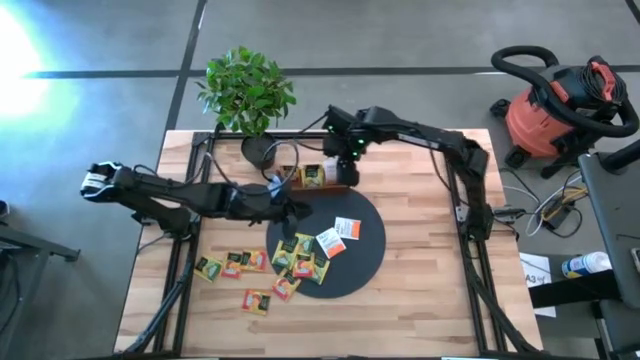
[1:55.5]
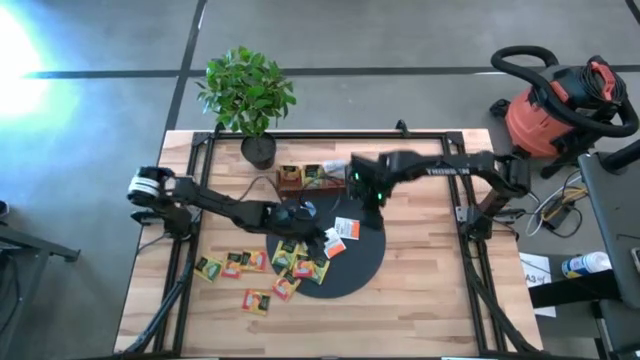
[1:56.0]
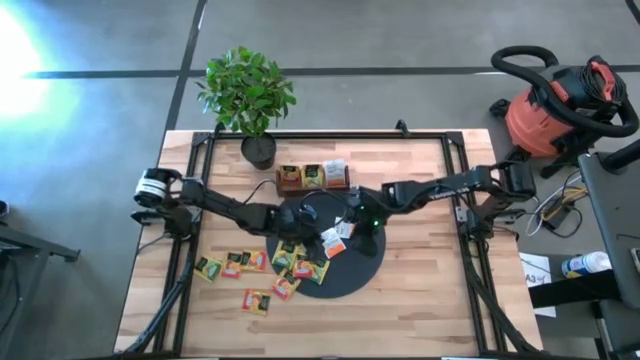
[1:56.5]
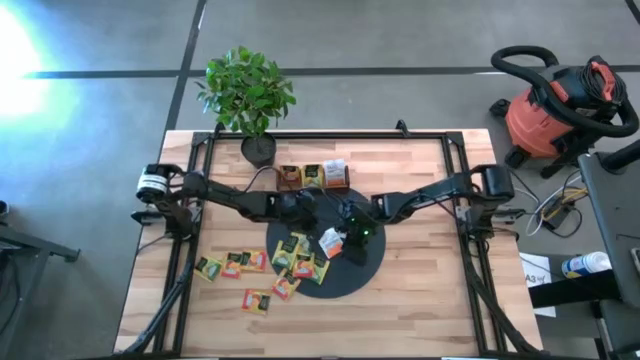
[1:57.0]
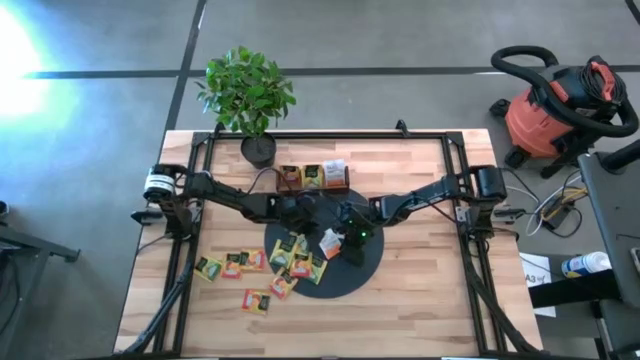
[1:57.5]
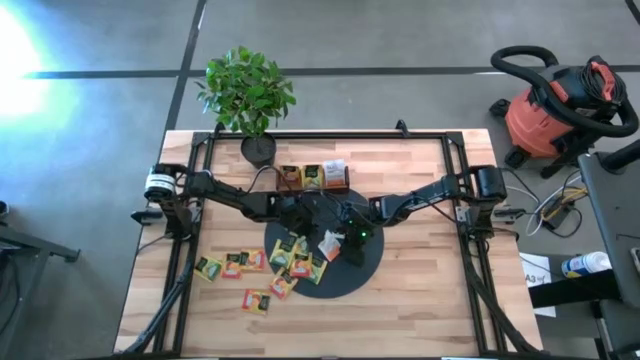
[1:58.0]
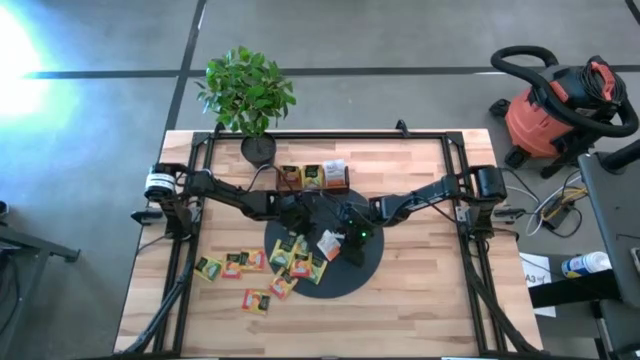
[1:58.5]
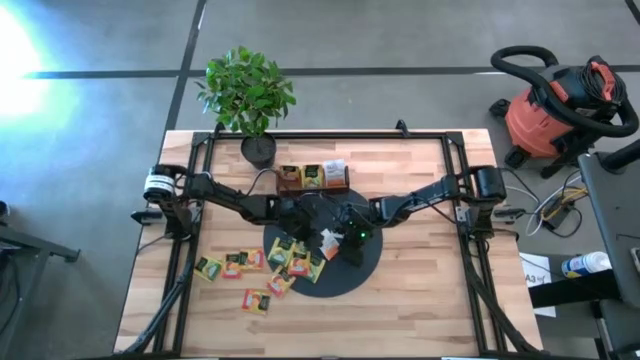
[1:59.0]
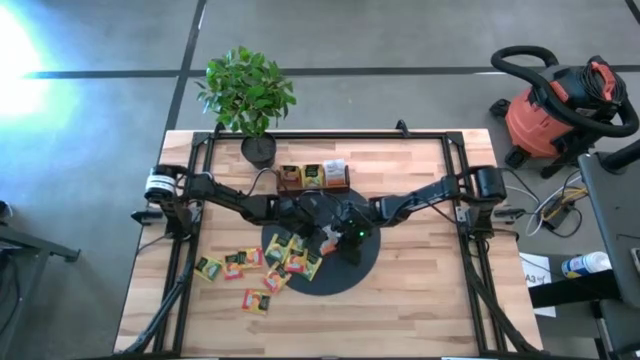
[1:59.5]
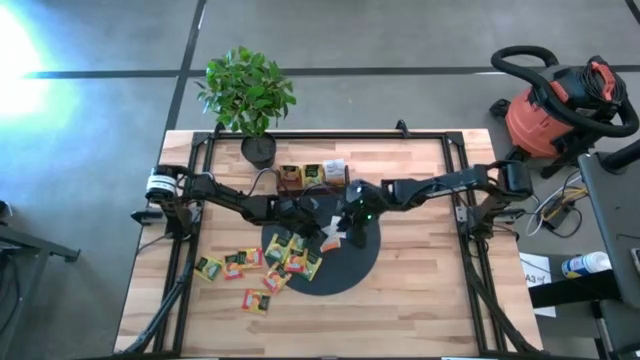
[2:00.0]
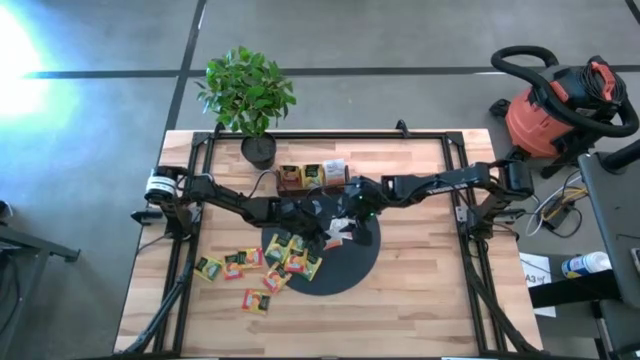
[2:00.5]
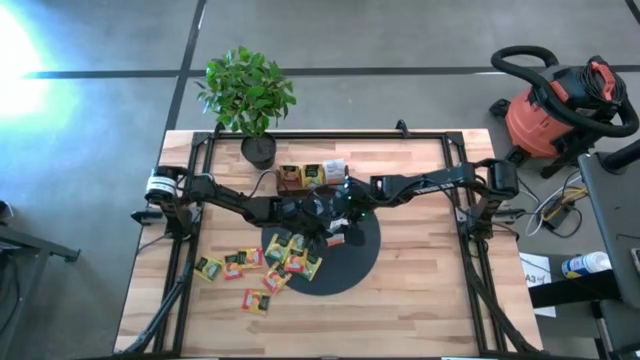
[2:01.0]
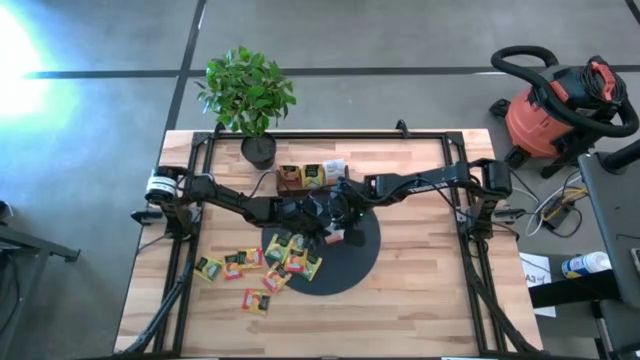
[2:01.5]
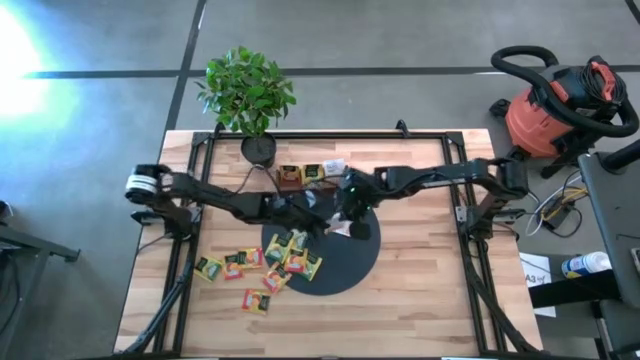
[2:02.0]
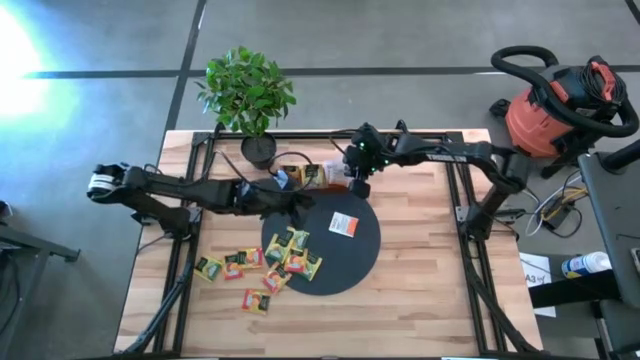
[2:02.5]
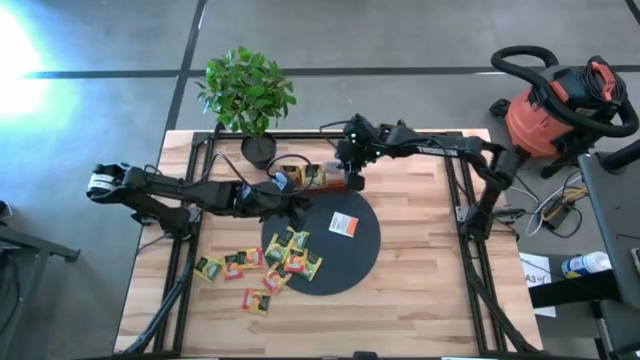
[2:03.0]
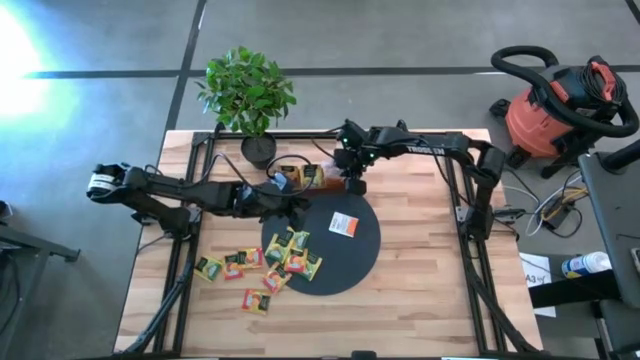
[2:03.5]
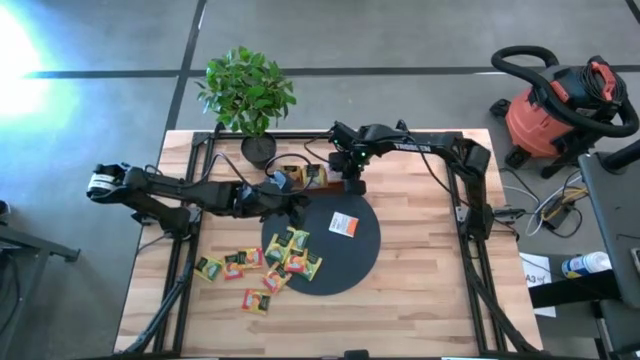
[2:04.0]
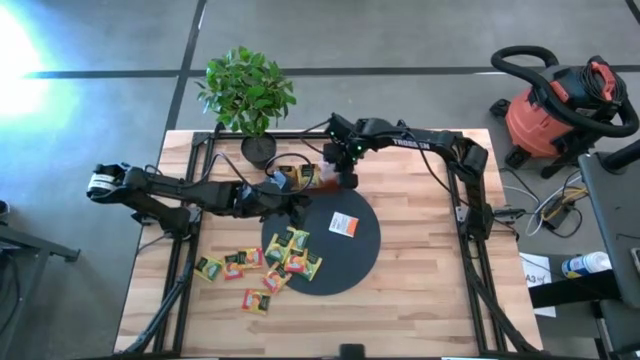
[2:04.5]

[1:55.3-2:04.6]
Task: Pick & Place Tea
Put the left white tea bag into the right slot of the wooden organizer

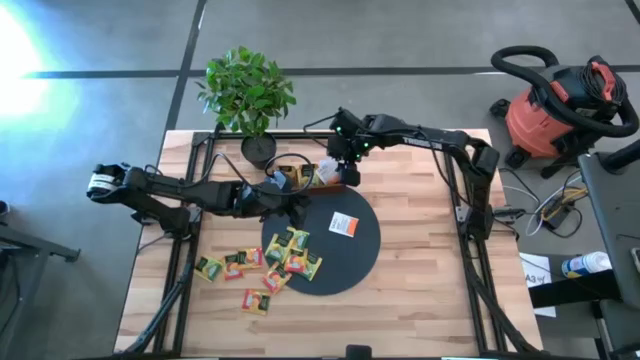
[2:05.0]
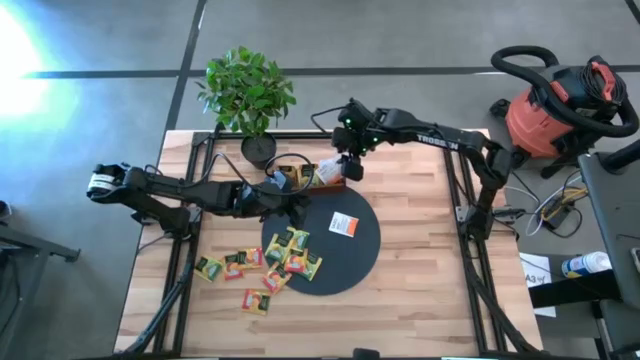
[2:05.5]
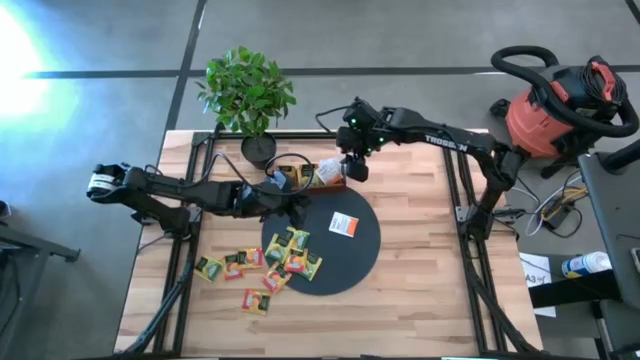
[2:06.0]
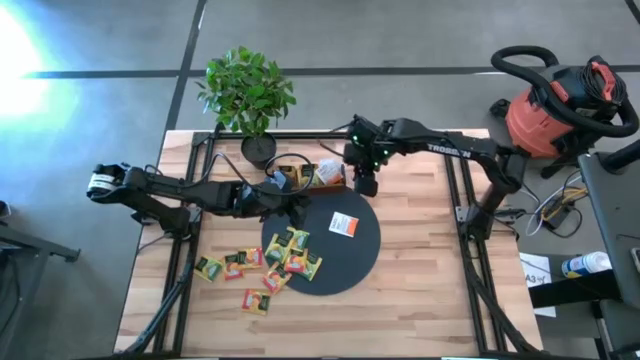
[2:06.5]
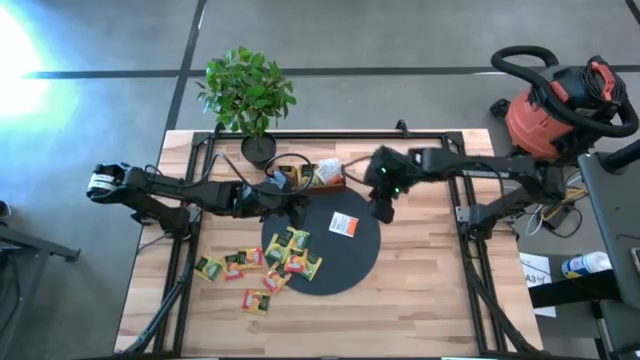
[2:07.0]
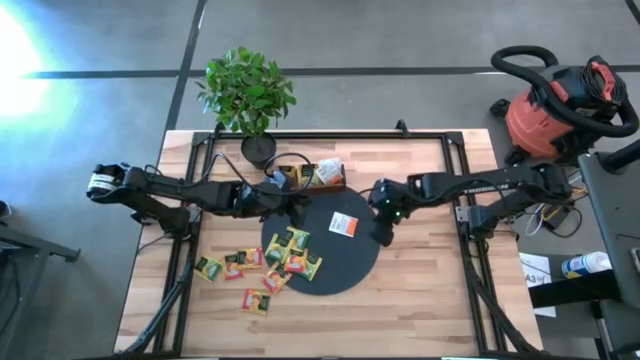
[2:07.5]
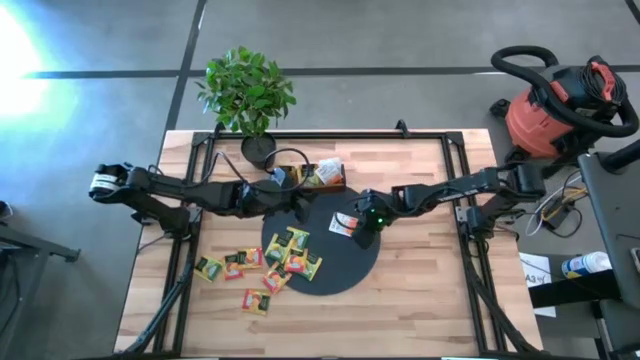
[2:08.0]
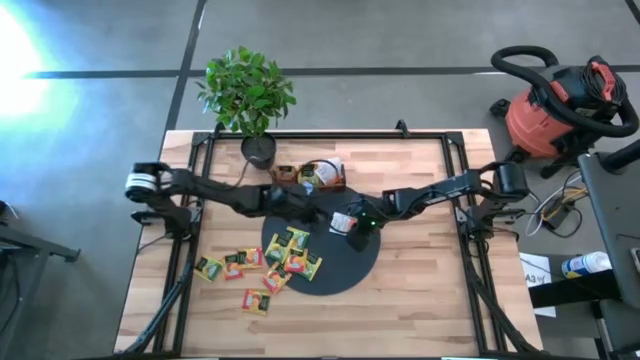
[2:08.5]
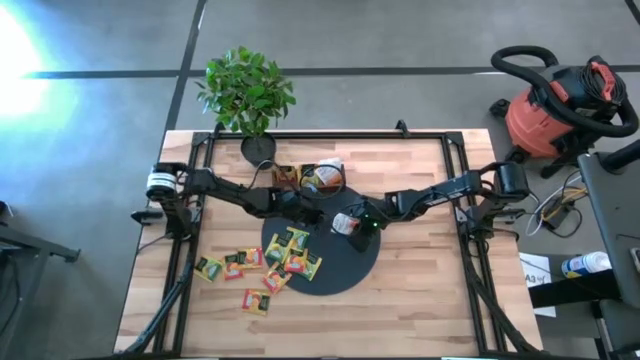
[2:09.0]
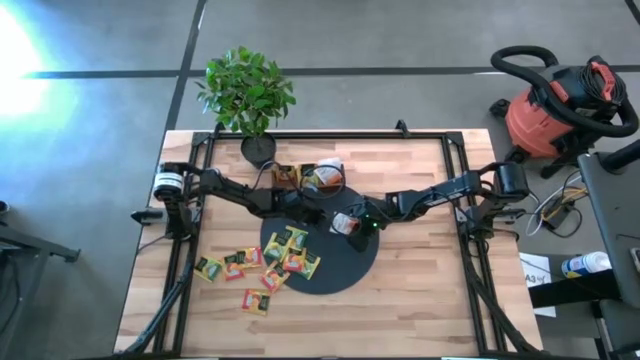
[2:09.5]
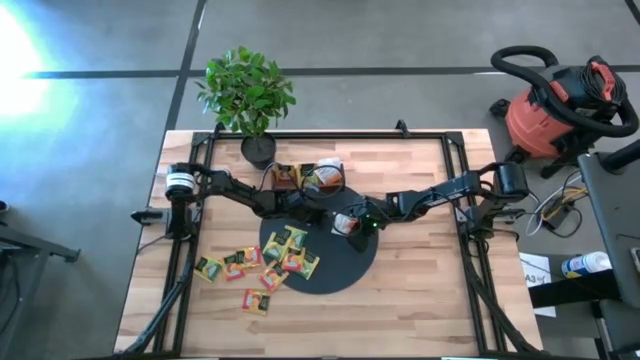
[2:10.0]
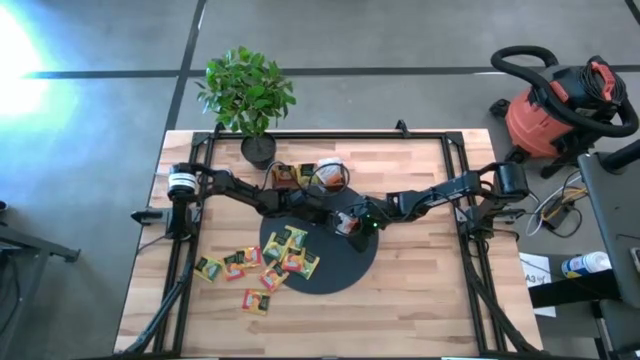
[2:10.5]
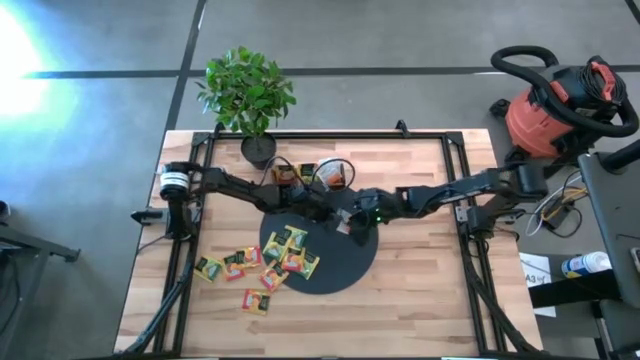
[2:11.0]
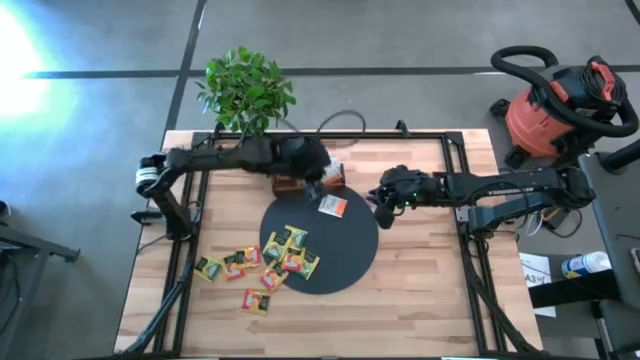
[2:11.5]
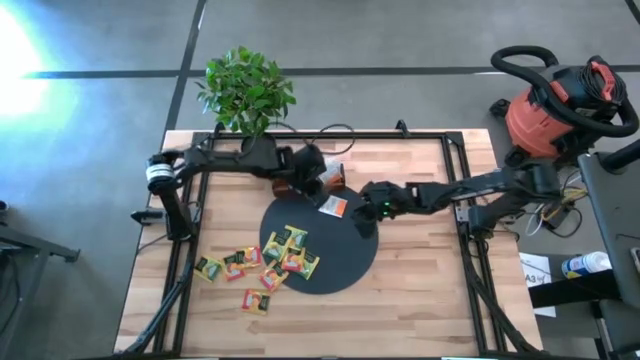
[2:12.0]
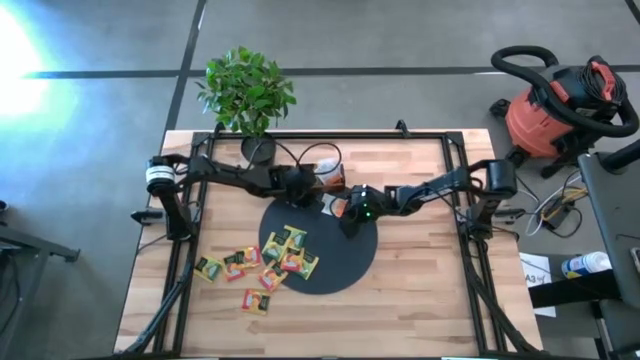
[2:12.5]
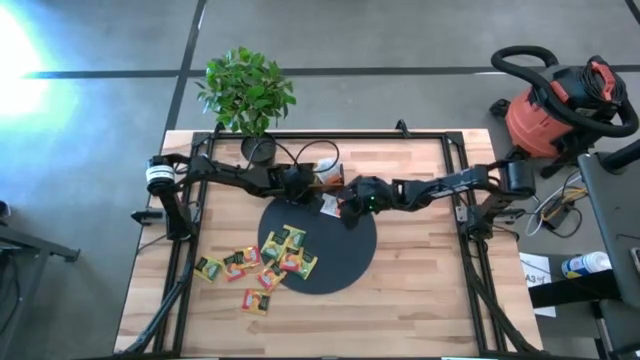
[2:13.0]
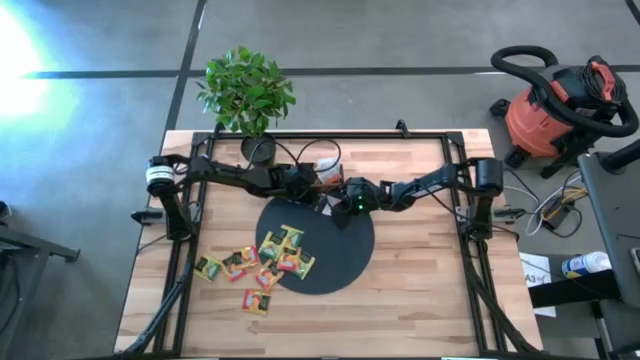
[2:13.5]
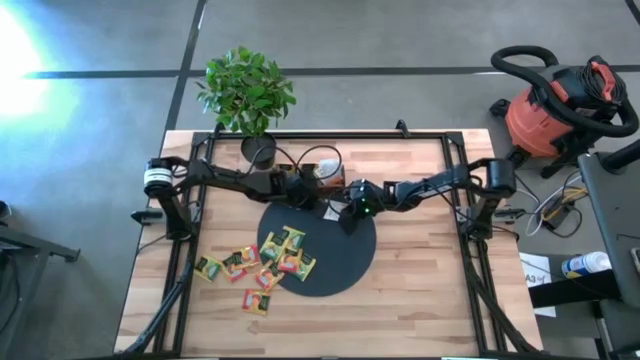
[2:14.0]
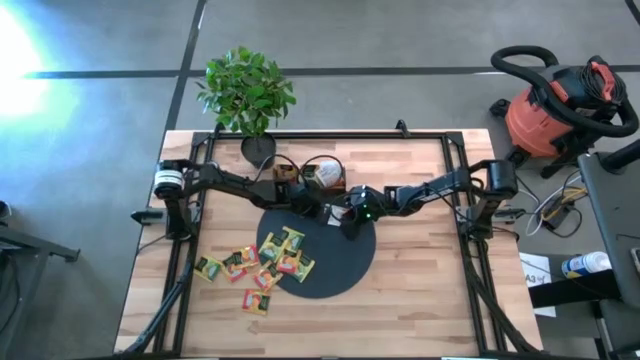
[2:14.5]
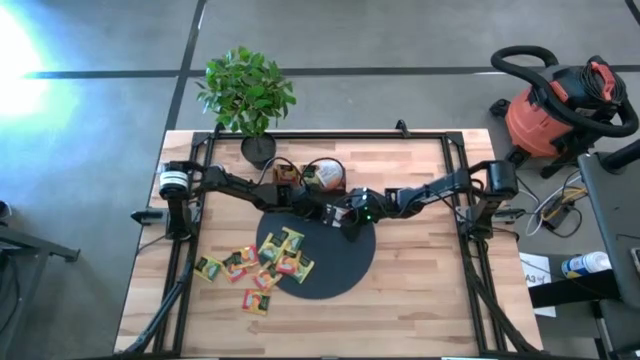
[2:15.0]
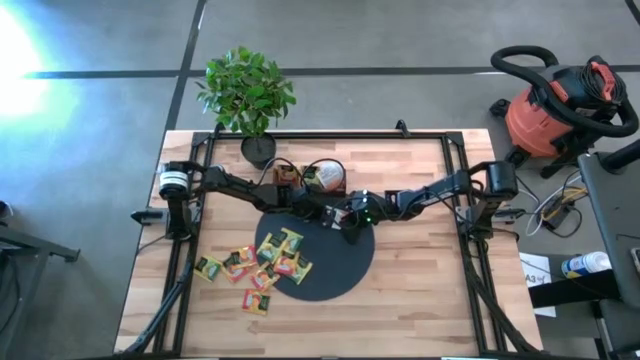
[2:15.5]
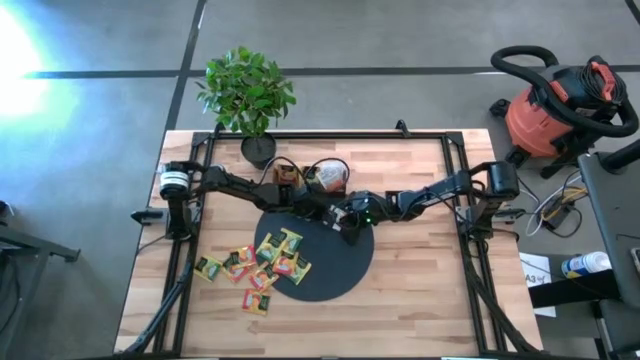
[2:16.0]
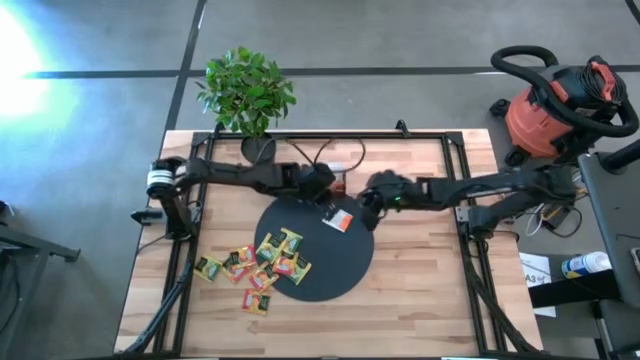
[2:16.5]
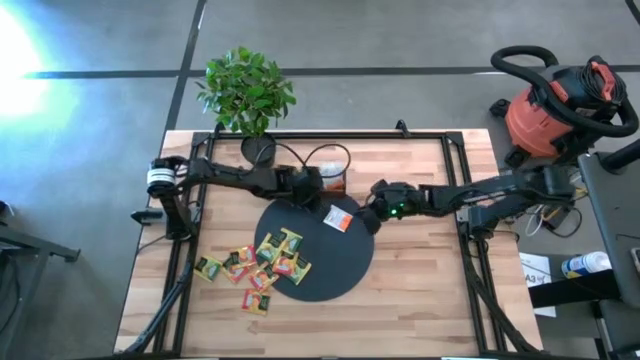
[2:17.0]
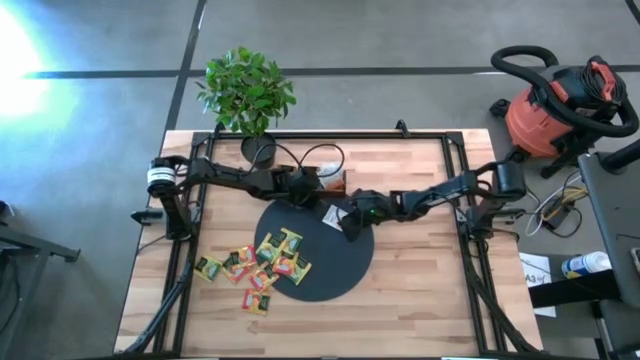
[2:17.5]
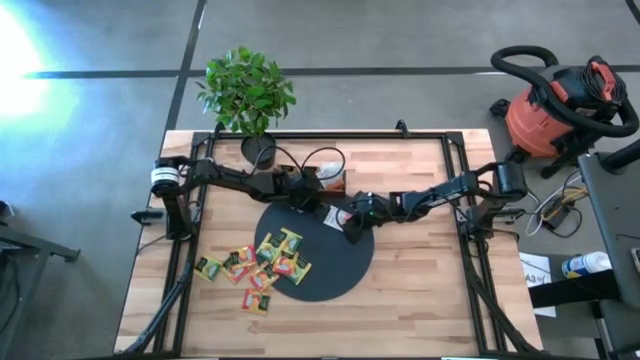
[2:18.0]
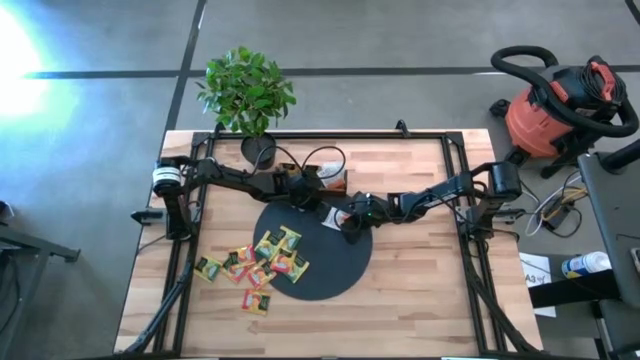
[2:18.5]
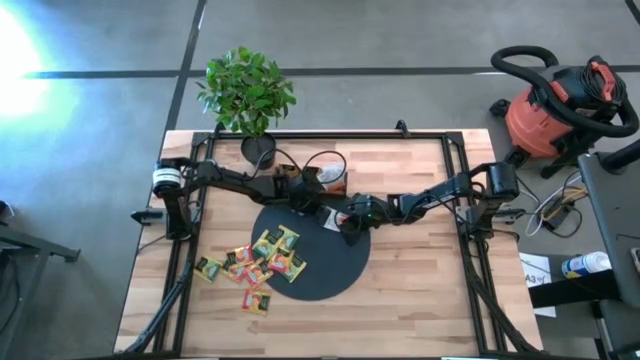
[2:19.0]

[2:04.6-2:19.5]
Put the white tea bag into the right slot of the wooden organizer
